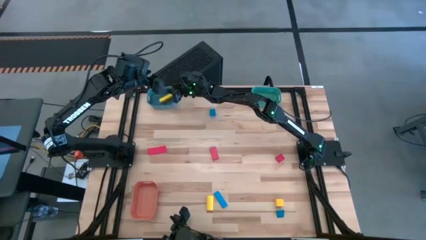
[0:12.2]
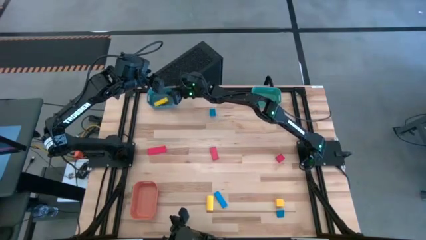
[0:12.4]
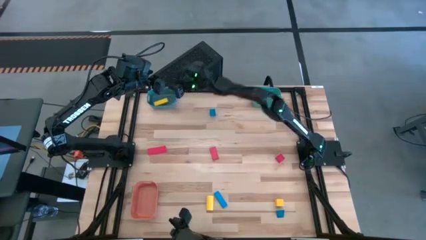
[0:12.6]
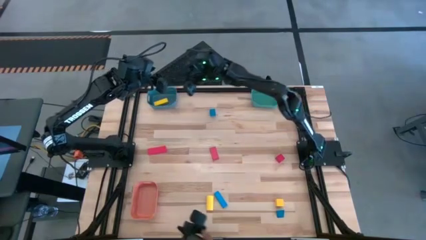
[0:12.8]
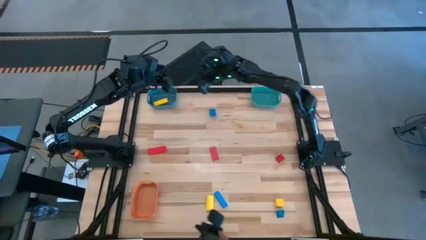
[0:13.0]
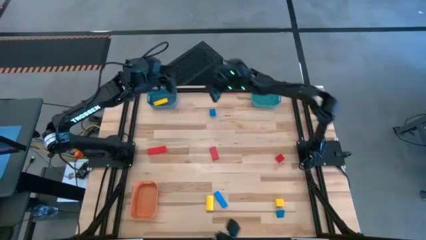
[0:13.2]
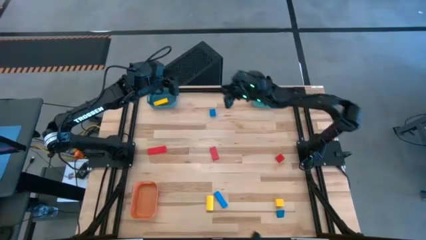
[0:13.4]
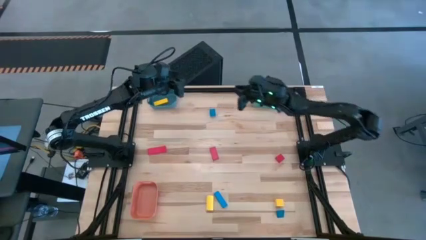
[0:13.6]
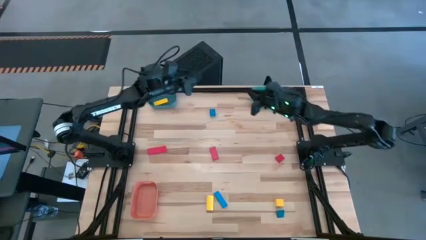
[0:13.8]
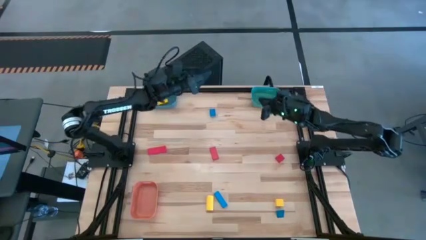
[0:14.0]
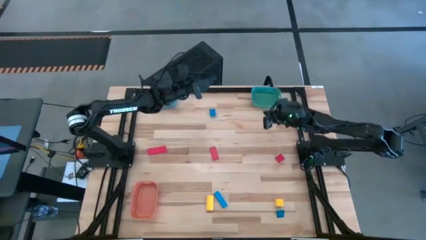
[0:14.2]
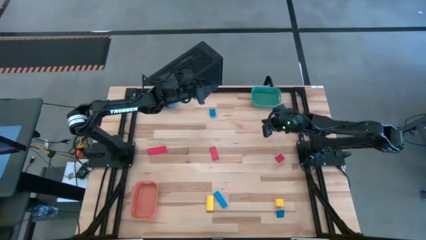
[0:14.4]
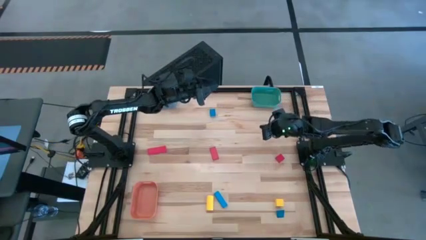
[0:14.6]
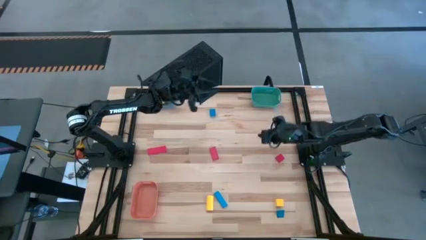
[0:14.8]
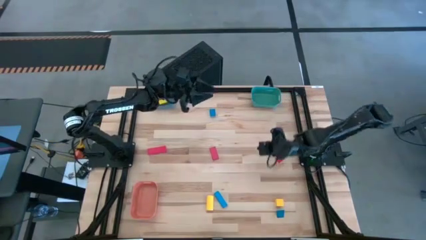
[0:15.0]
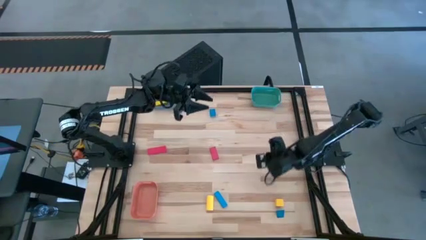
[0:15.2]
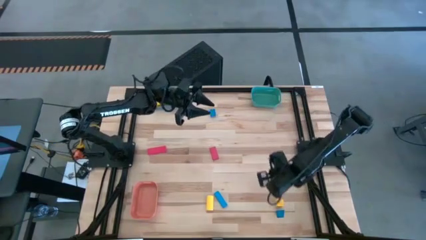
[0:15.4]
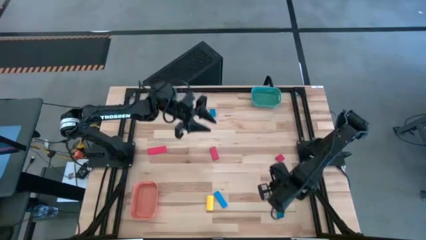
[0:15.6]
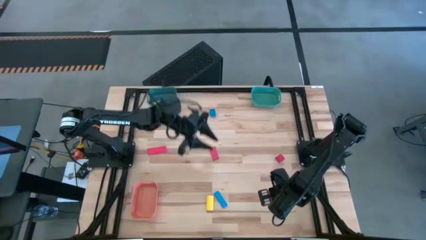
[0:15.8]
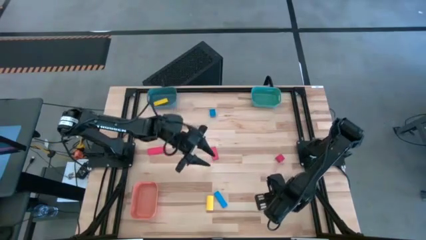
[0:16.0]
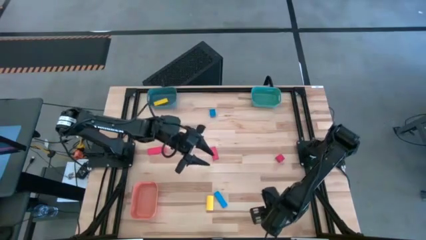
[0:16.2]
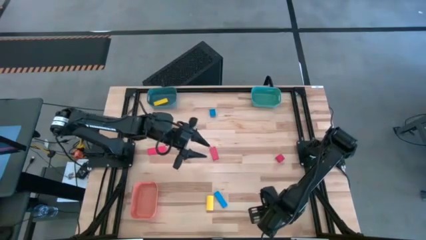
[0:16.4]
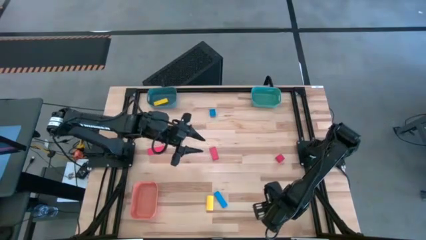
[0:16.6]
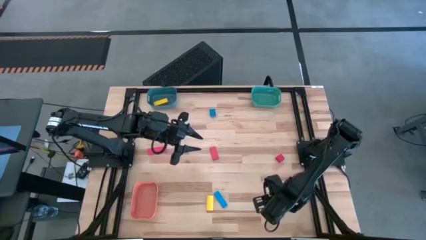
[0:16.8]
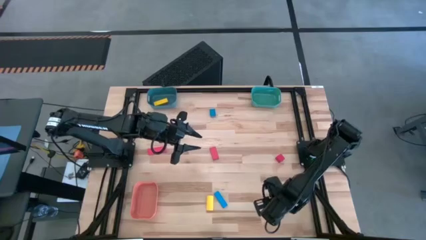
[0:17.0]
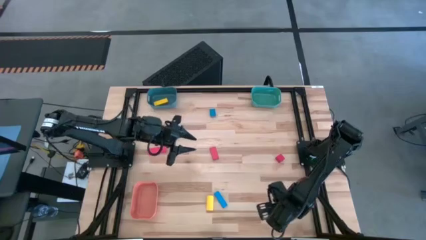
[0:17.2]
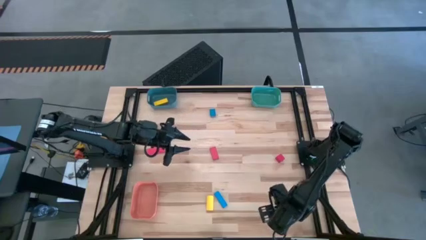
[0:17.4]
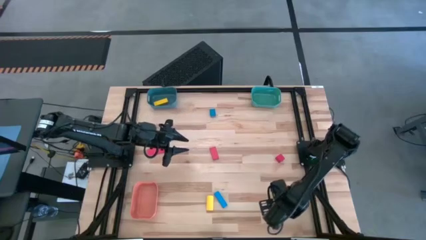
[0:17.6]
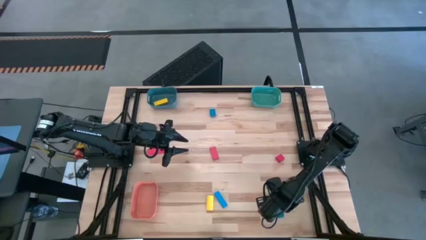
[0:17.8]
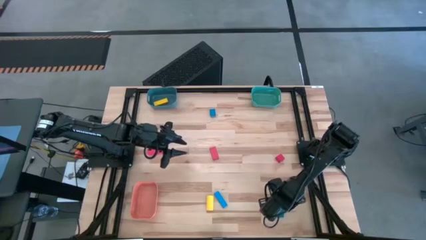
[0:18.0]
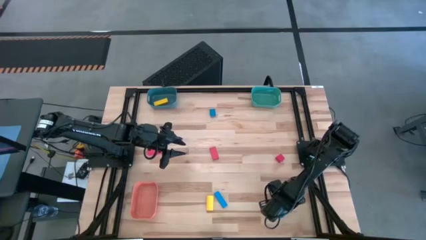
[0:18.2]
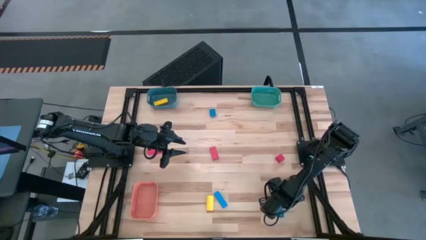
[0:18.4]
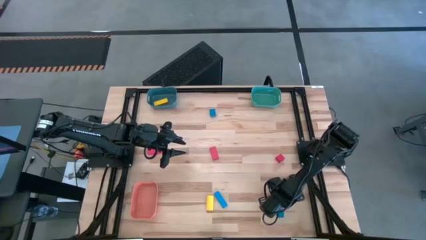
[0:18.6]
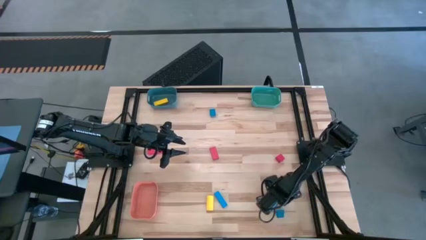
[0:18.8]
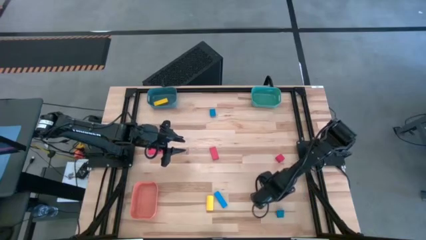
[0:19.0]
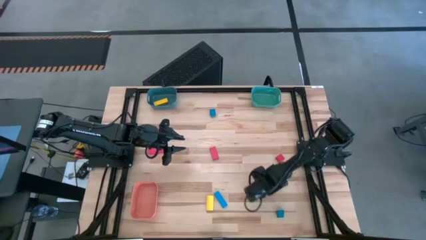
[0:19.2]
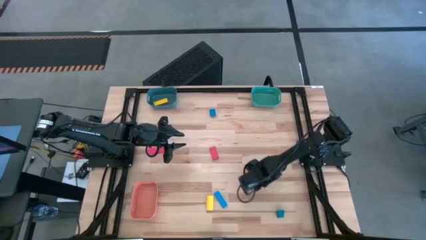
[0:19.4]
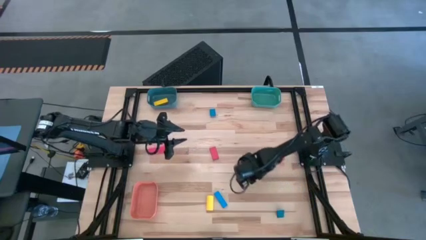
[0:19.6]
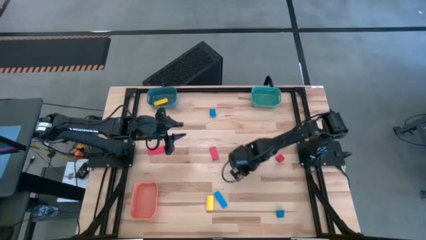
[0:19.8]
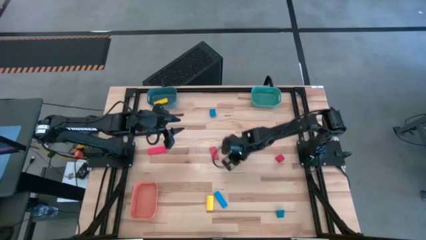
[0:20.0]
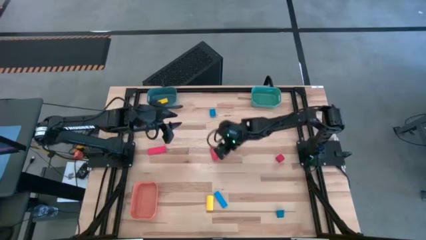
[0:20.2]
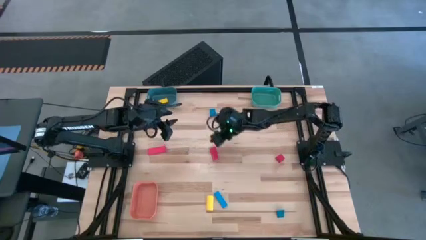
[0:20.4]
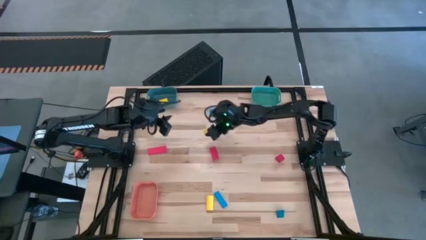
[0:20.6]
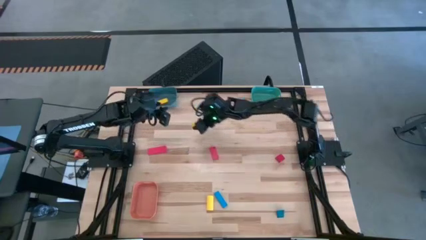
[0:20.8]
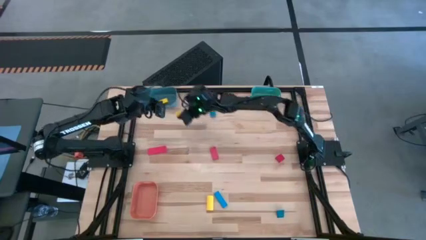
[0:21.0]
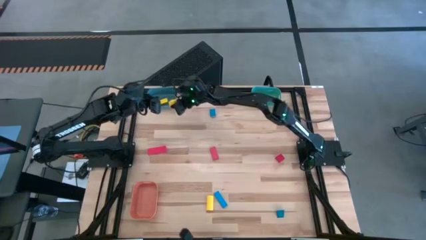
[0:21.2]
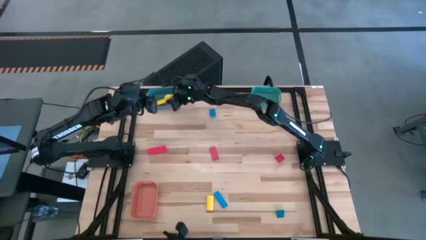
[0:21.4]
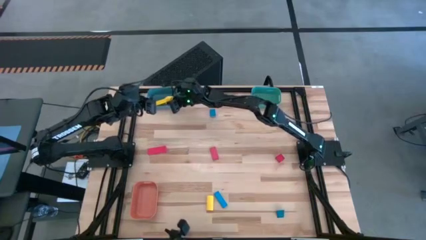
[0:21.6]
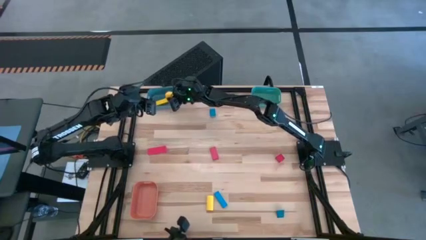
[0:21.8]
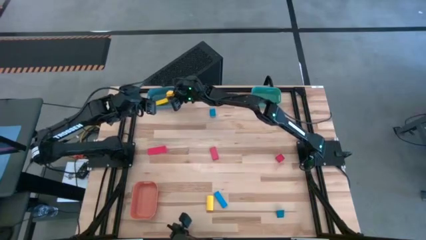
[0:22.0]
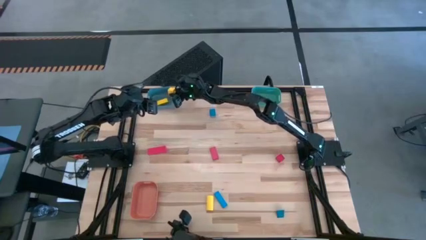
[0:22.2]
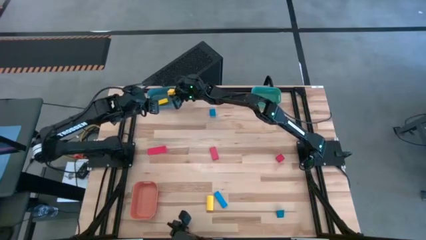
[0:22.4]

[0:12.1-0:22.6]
Task: Sort & place blocks by color
Put the right yellow block into the blue bin

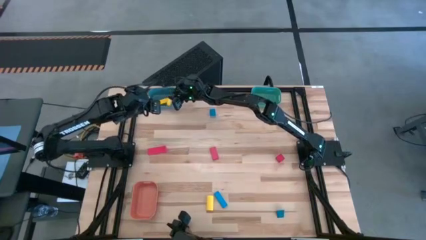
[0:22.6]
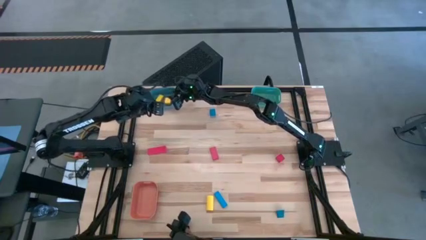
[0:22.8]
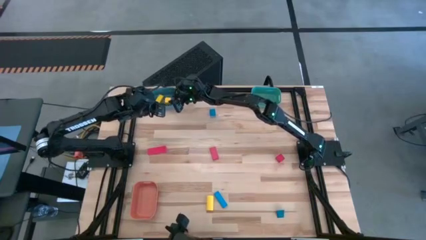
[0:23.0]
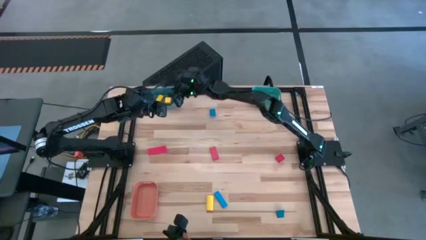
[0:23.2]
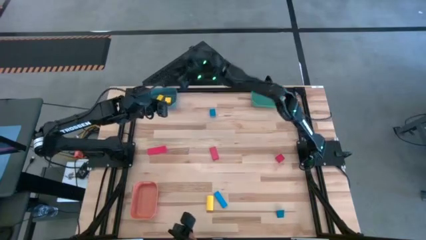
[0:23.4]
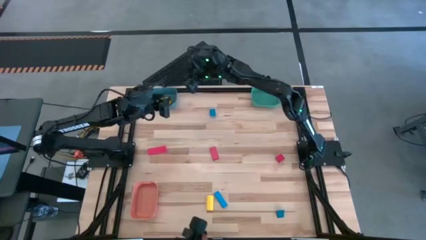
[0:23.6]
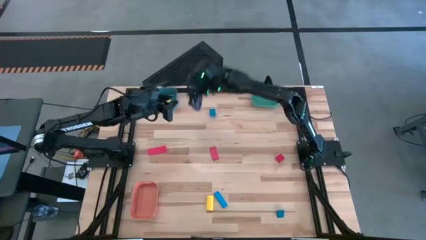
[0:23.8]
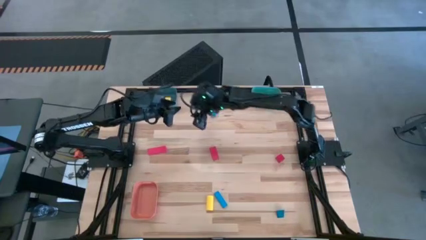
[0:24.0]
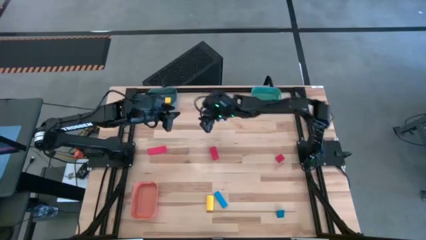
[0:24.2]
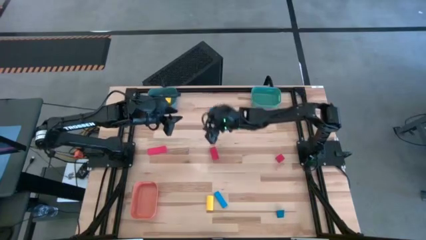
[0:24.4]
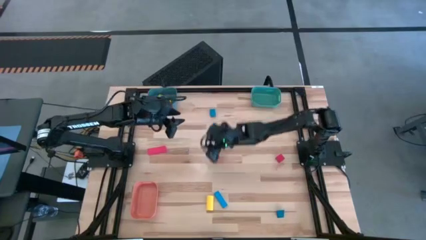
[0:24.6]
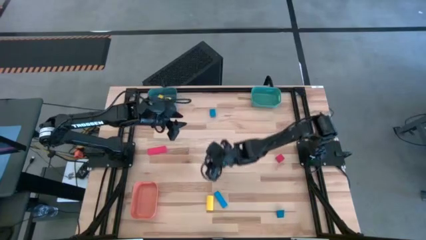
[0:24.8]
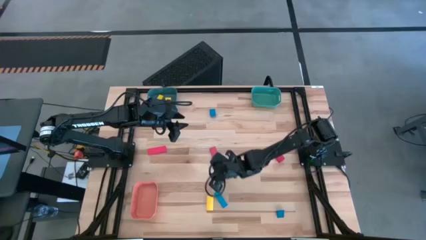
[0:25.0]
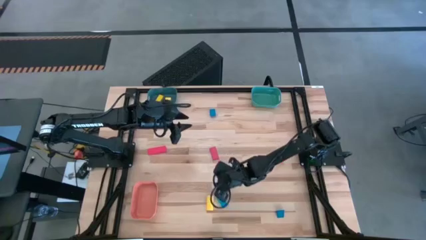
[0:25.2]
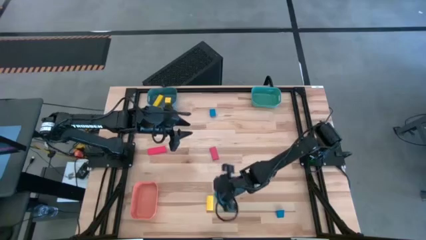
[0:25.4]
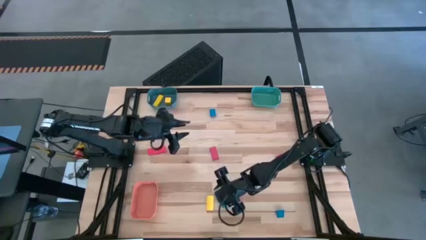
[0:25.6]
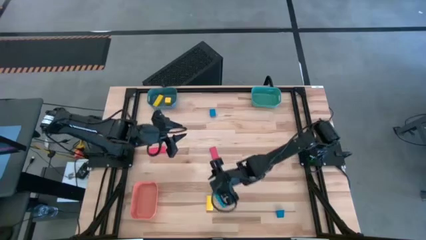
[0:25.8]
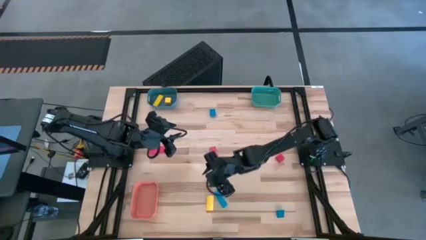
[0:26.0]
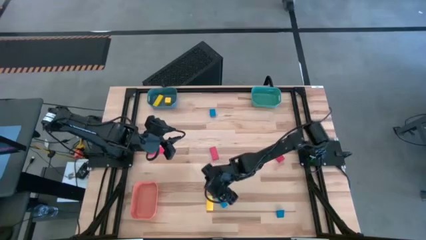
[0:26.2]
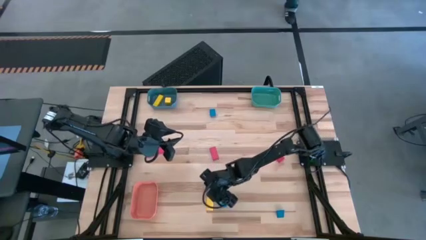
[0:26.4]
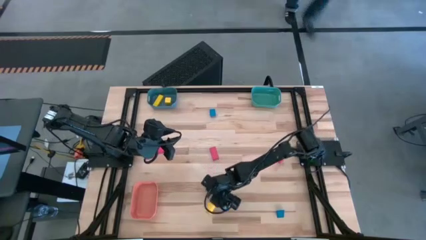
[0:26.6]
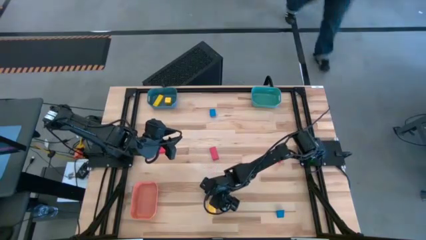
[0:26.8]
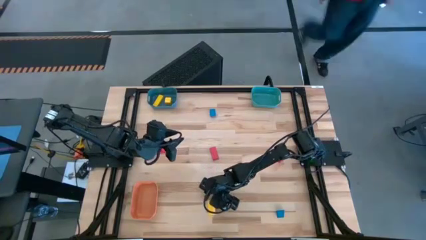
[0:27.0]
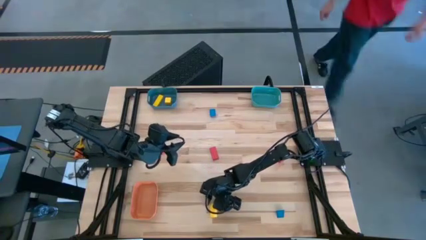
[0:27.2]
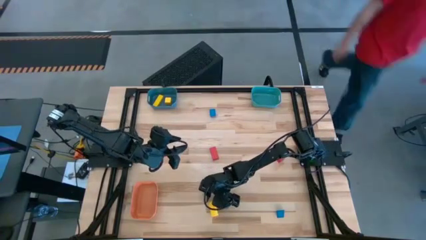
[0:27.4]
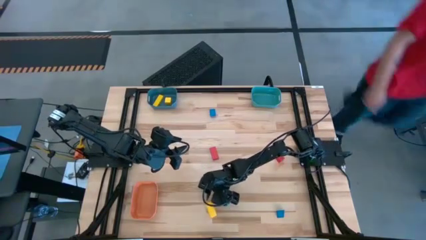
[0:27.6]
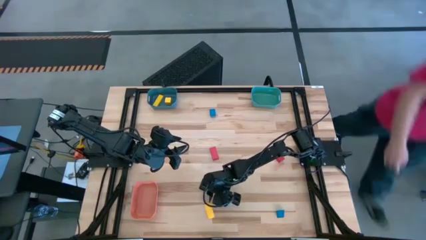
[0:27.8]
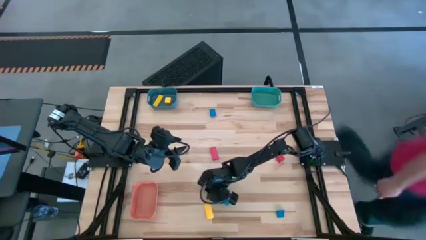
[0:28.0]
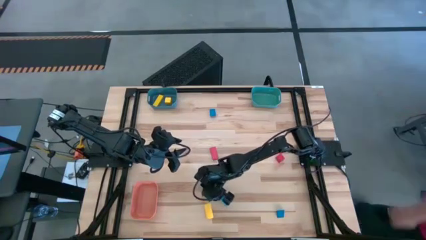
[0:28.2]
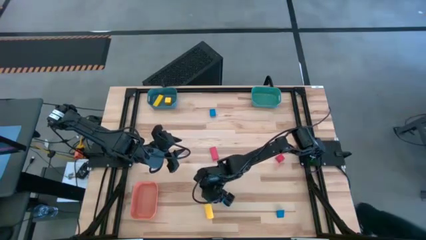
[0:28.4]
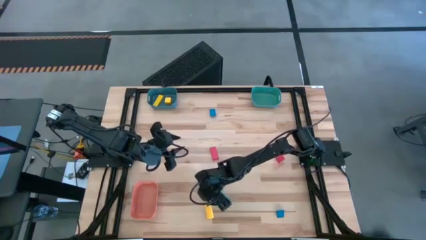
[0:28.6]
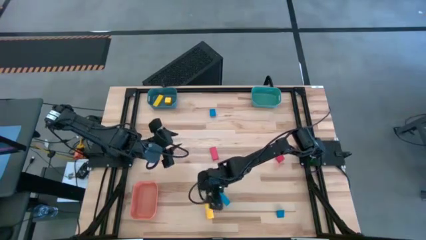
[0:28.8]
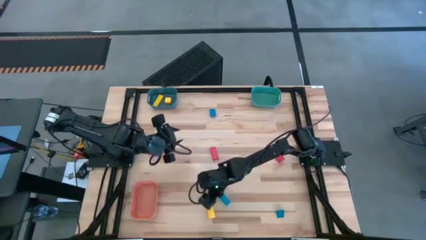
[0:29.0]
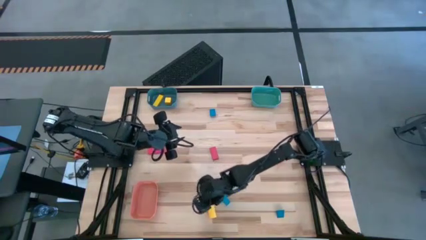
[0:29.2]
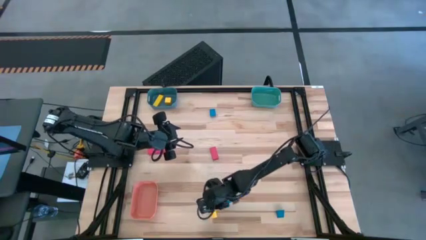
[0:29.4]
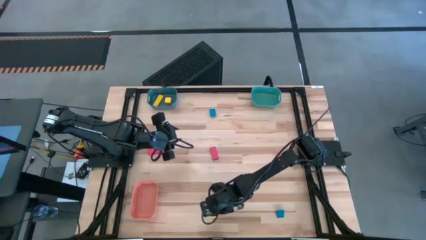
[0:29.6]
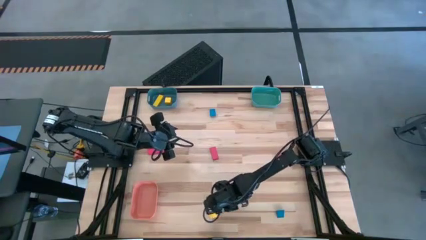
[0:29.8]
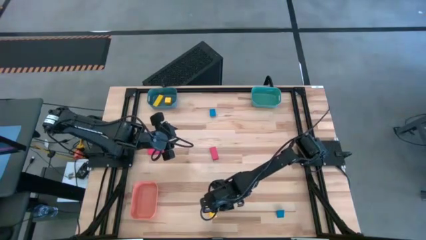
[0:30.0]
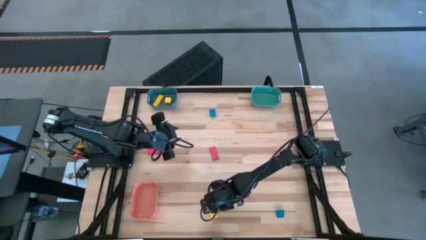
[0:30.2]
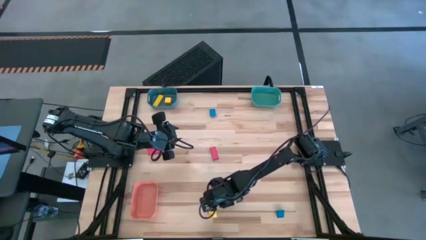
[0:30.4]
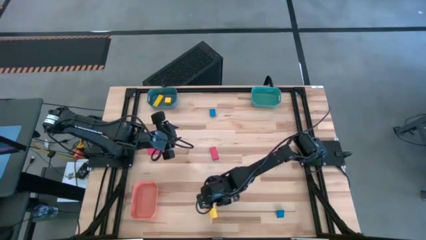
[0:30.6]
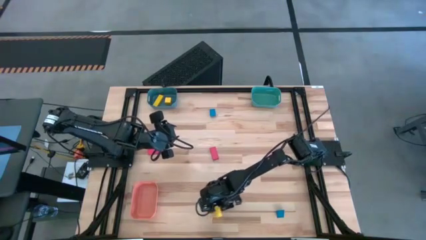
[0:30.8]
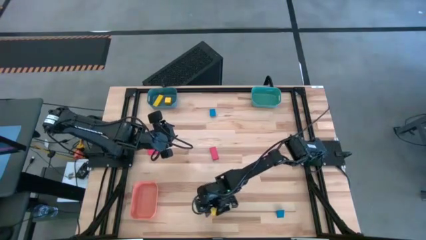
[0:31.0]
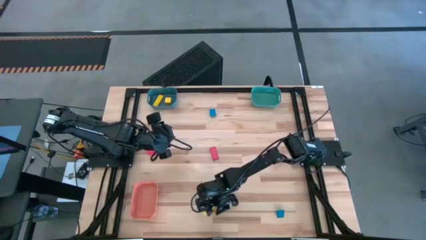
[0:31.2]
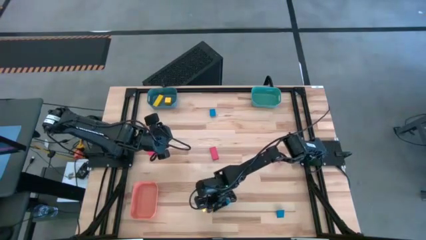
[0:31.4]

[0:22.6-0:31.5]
Put the yellow block into the blue bin
